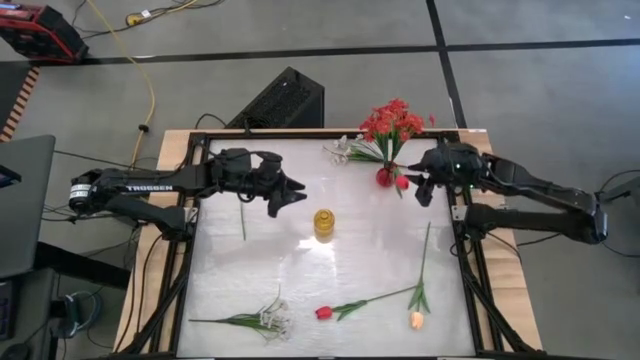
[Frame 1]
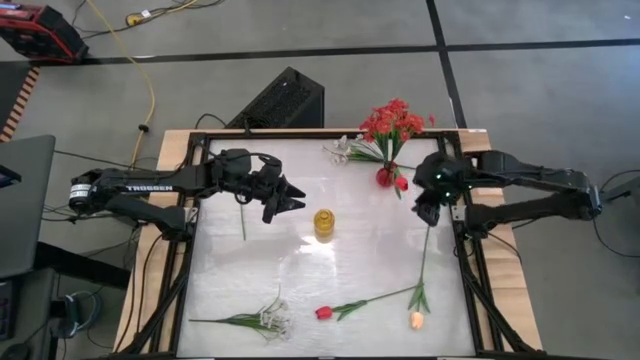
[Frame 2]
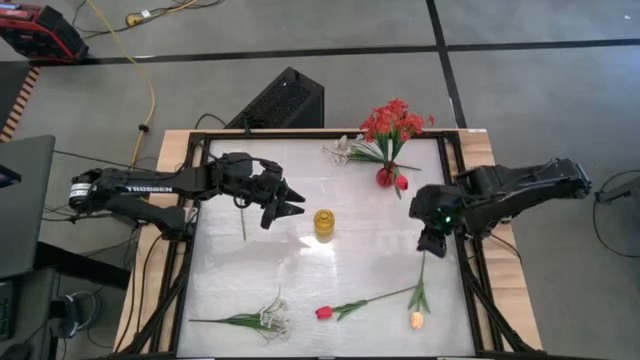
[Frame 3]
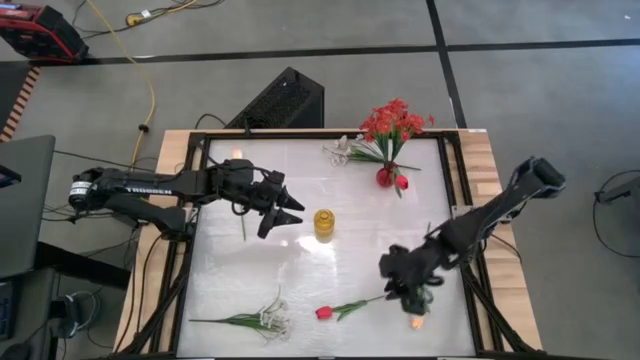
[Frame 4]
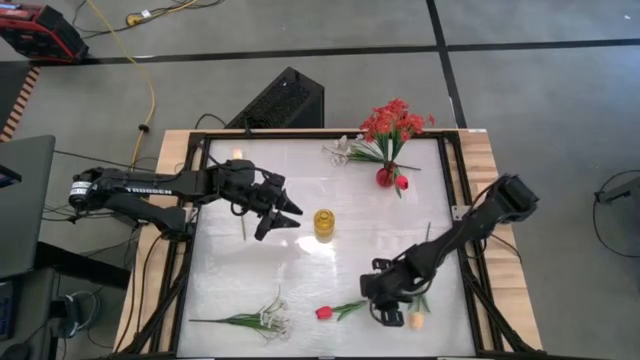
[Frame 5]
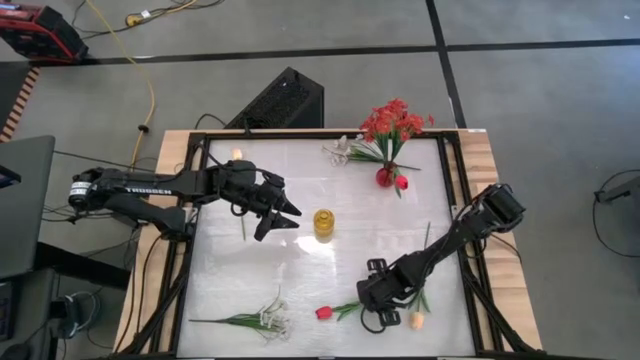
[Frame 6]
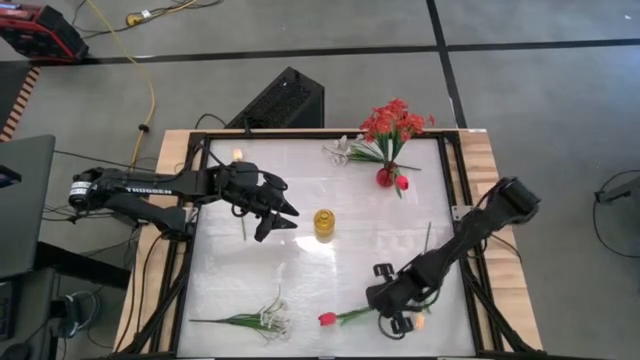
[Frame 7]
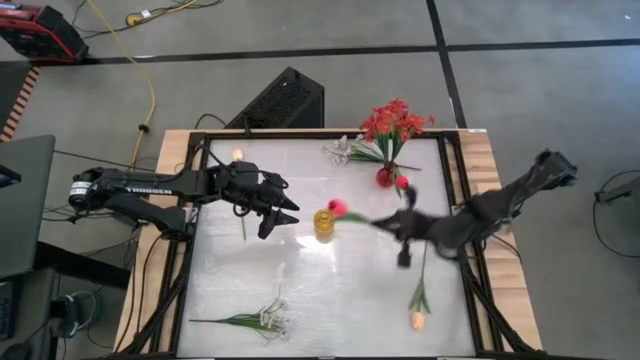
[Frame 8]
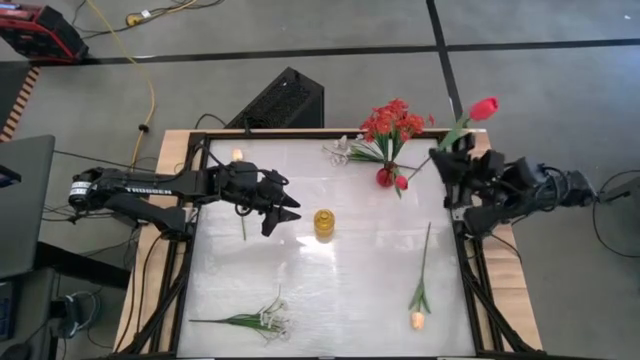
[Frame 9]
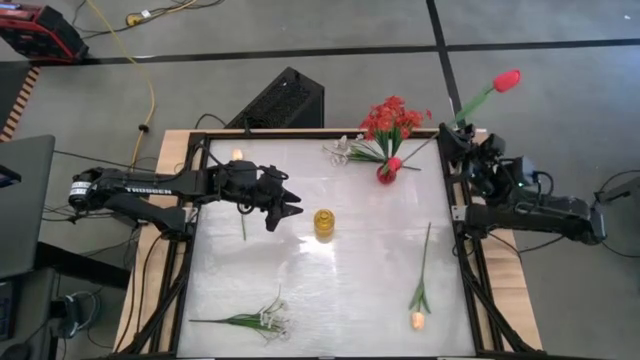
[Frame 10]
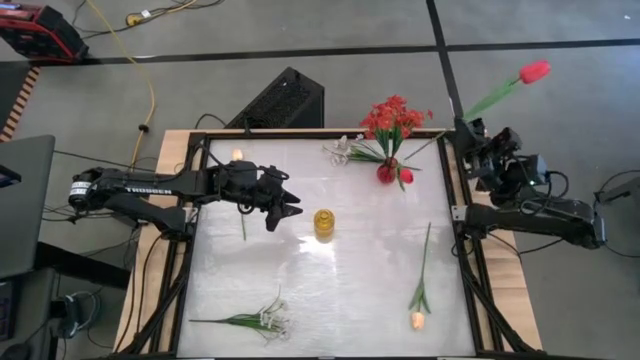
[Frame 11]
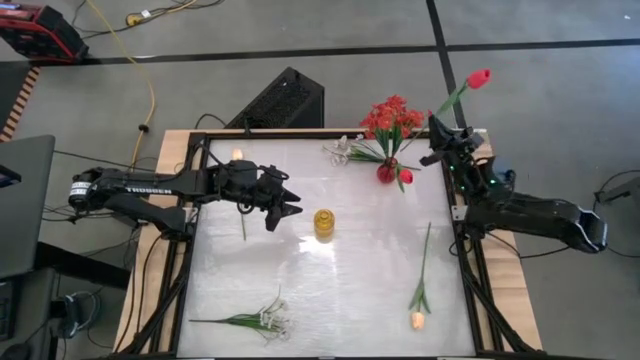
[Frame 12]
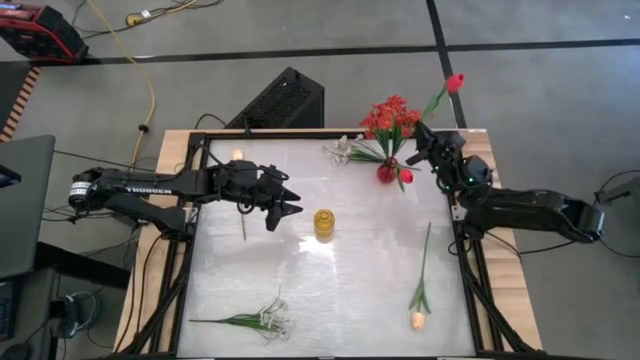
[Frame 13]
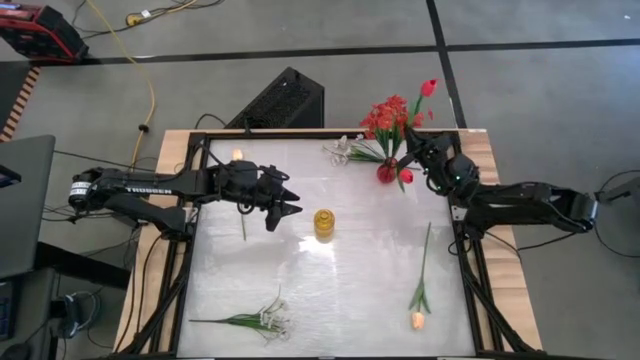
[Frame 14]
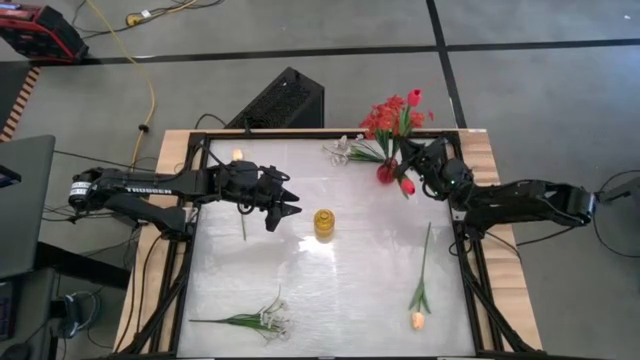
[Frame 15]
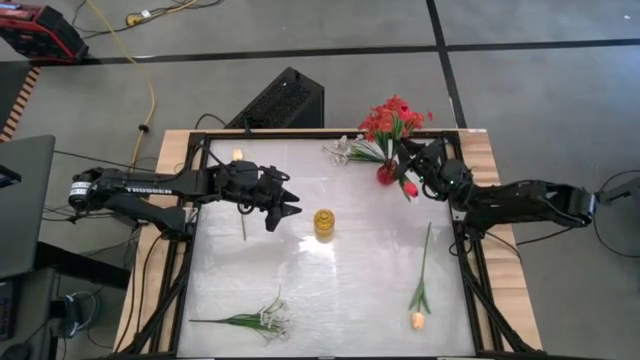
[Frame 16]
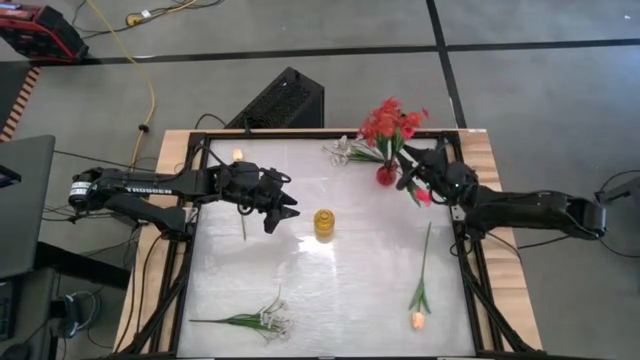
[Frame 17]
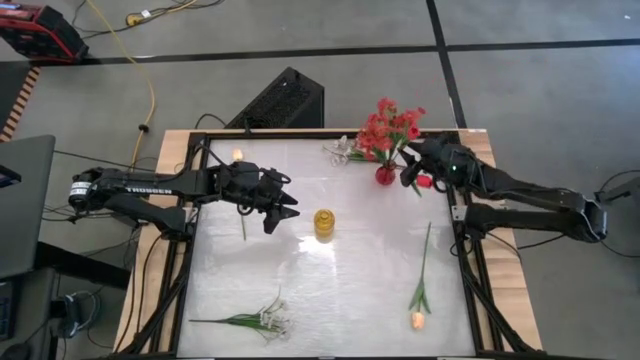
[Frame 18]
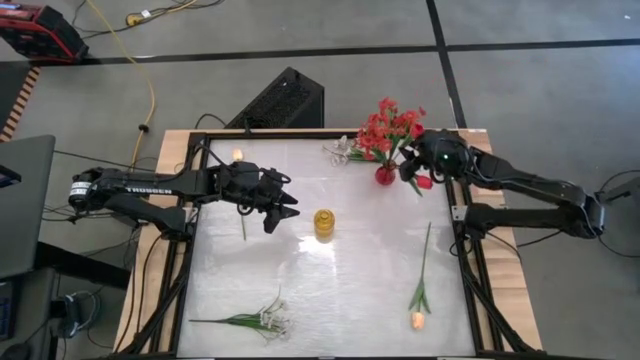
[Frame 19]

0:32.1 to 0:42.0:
Task: Sort flowers into vase by color
Put the red flower into the red vase

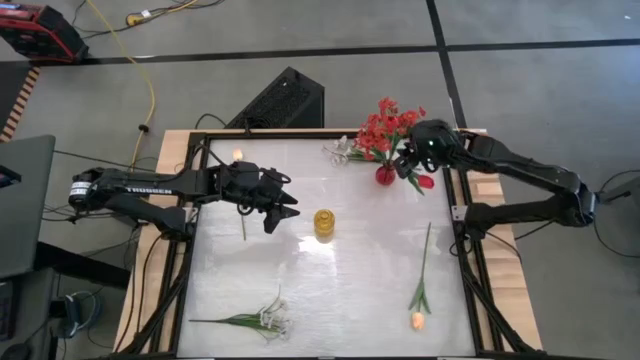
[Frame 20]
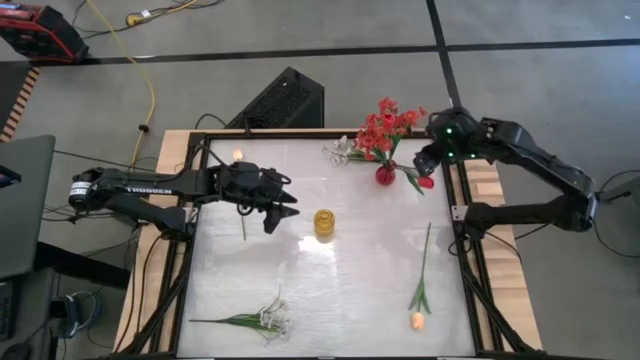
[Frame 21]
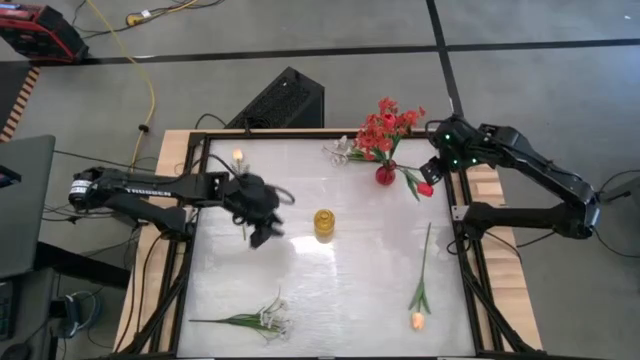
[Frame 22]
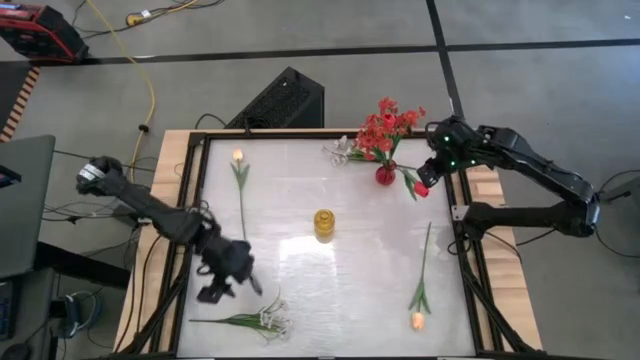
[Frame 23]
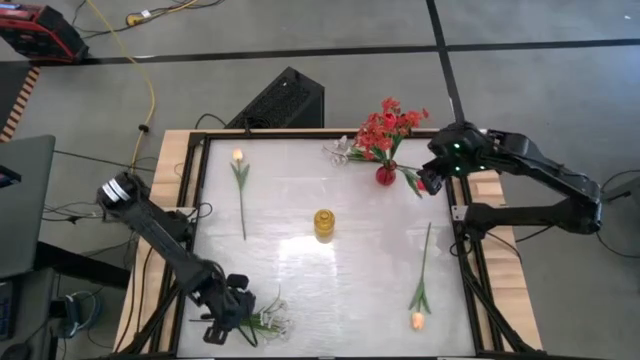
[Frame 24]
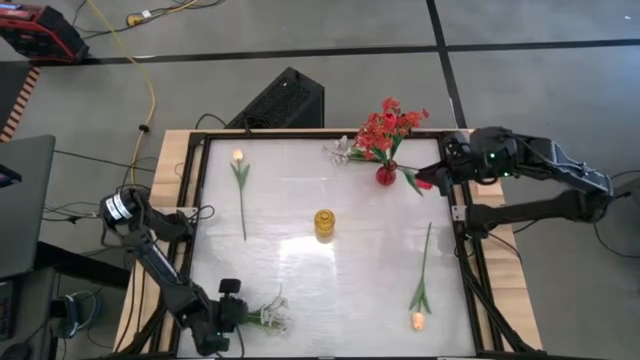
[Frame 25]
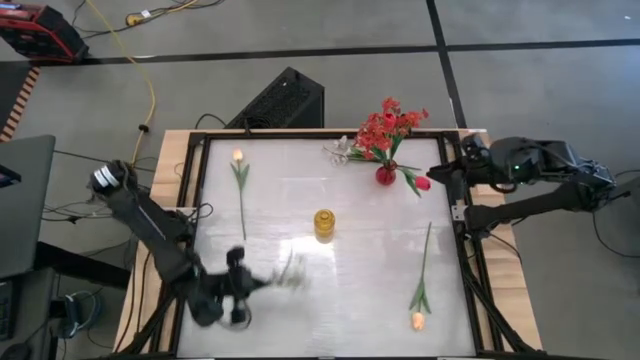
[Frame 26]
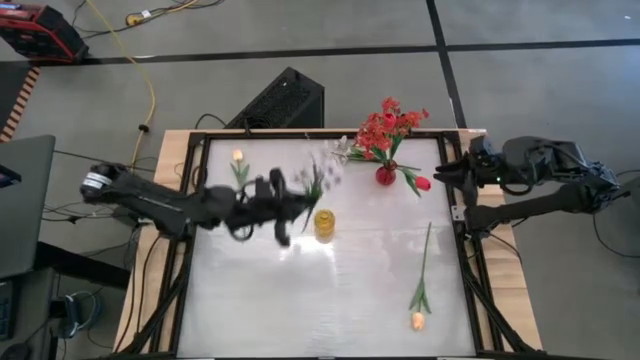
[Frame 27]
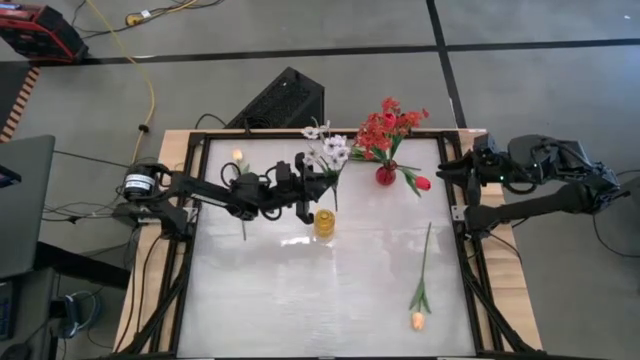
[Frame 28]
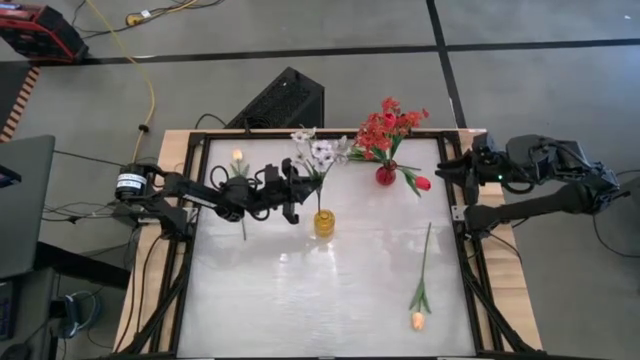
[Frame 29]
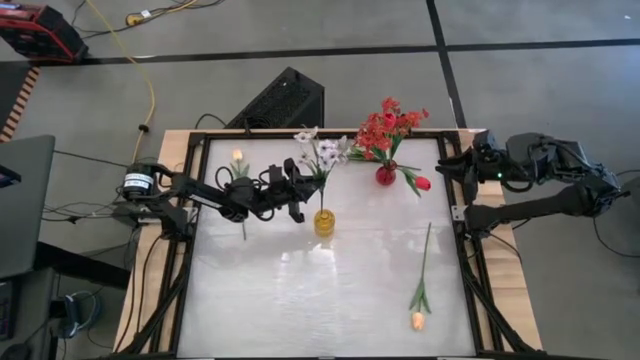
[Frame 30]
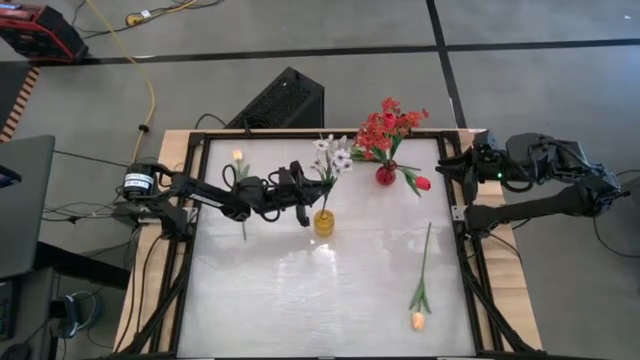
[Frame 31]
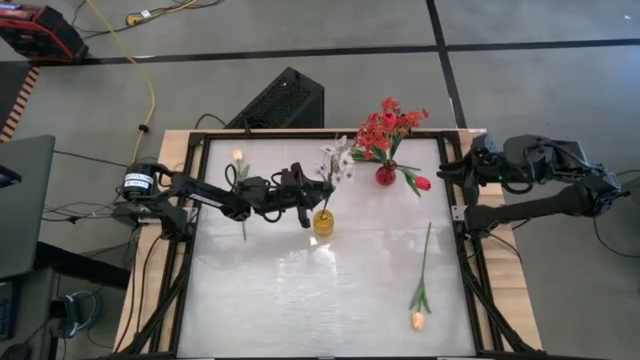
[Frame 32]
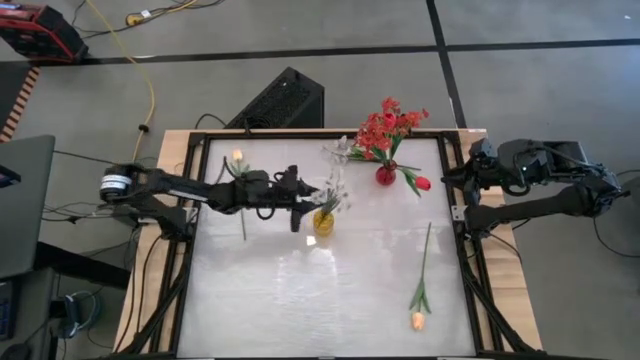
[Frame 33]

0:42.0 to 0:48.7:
Put the bottom white flowers into the yellow vase

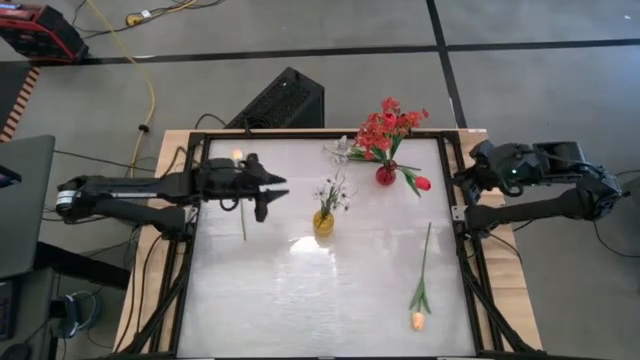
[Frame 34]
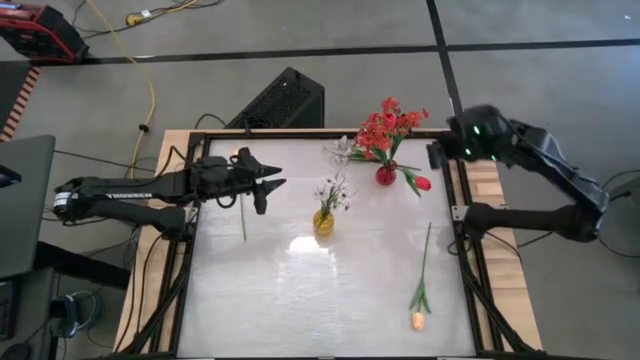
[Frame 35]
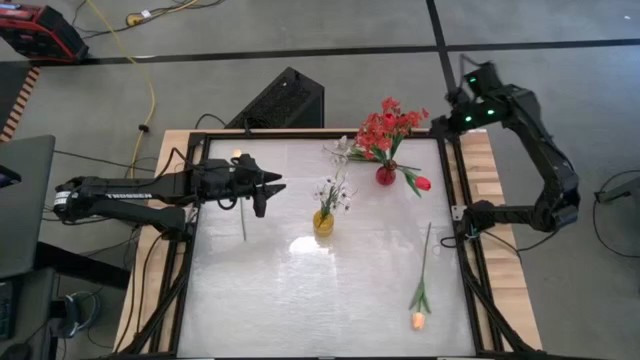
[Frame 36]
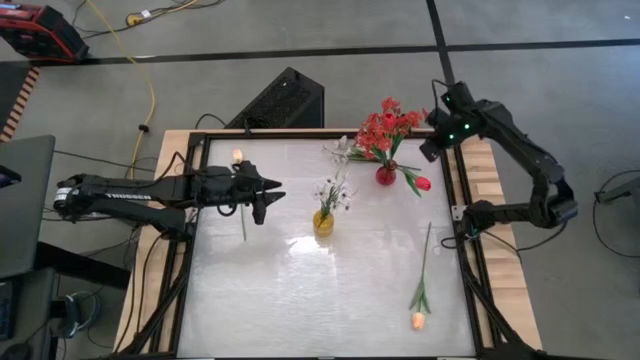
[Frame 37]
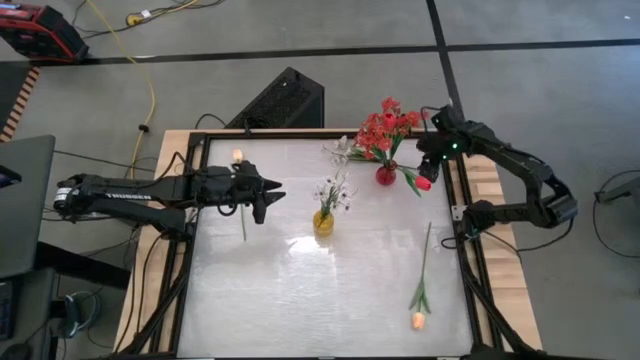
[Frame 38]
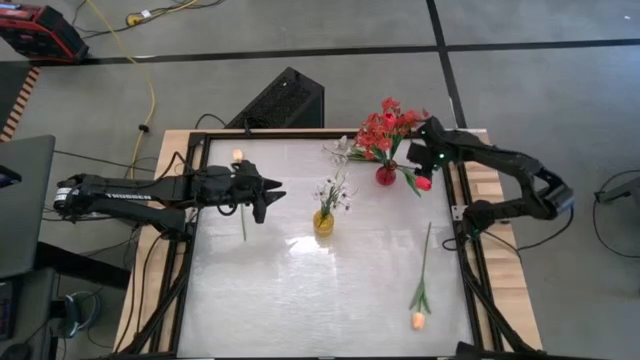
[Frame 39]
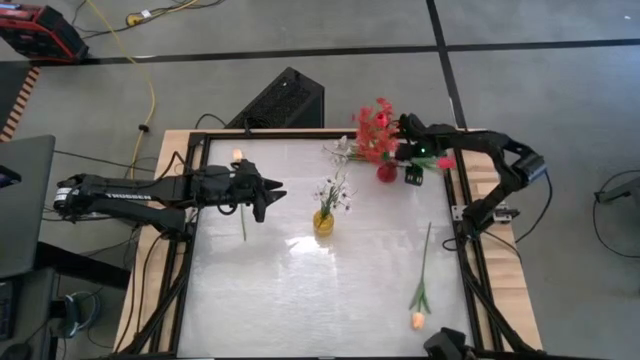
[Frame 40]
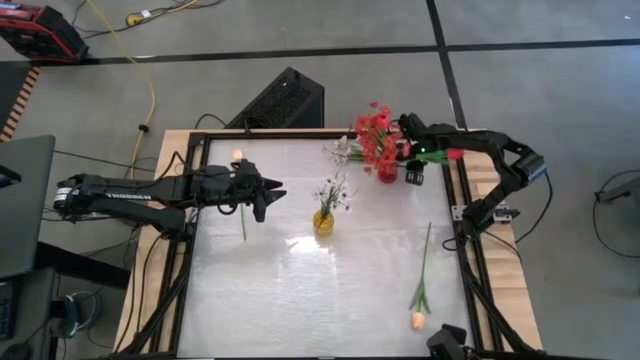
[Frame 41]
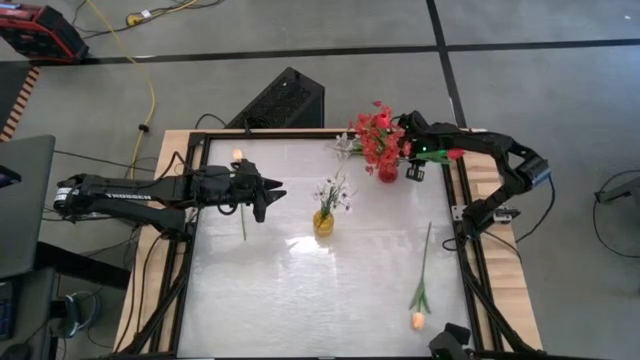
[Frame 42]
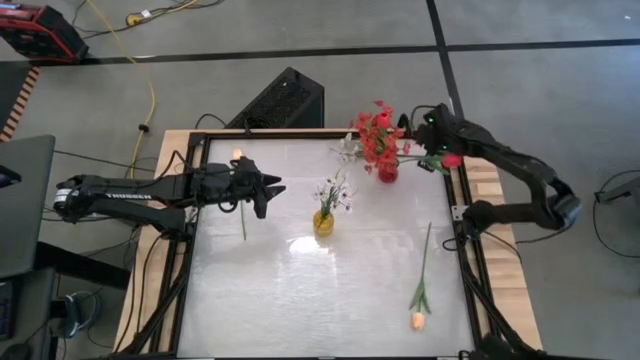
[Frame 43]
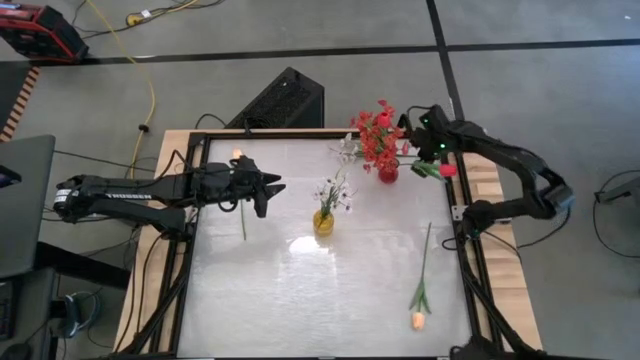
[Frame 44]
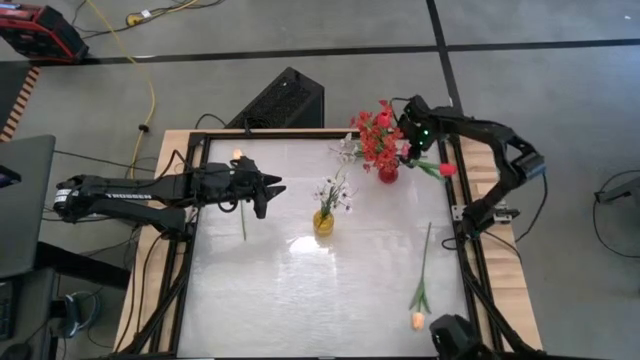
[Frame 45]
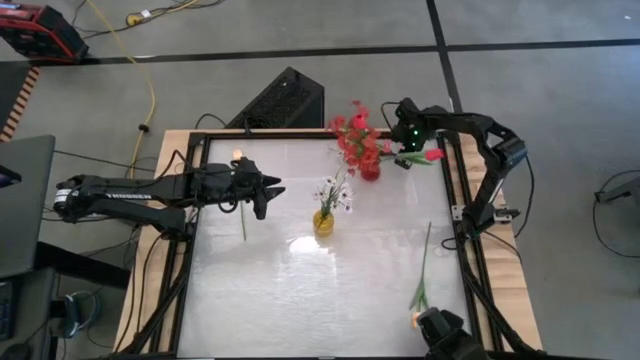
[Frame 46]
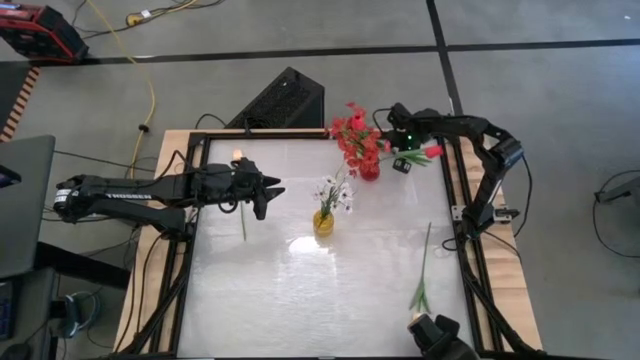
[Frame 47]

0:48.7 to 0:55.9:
Put the white flowers into the yellow vase
